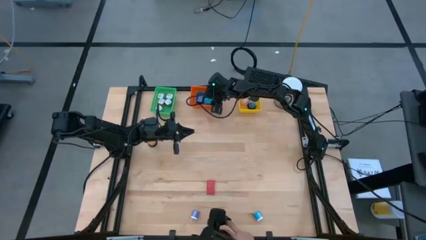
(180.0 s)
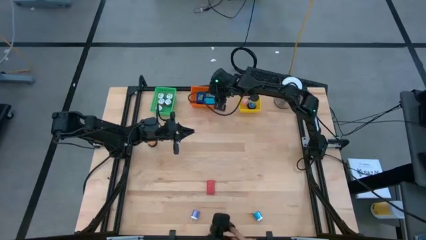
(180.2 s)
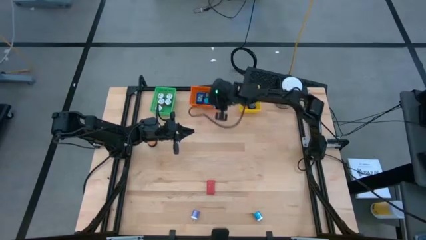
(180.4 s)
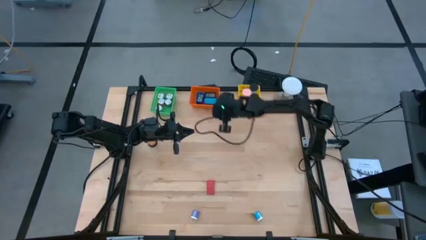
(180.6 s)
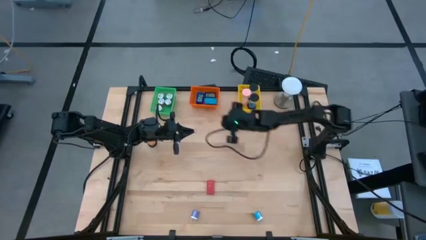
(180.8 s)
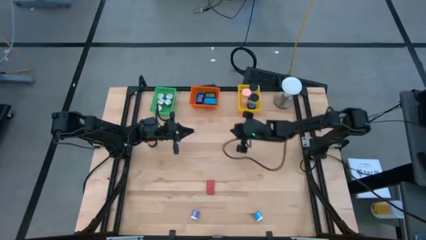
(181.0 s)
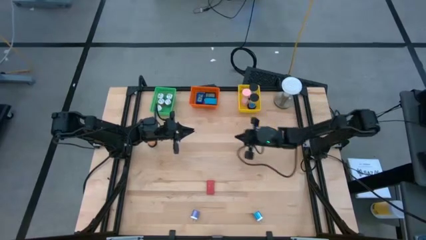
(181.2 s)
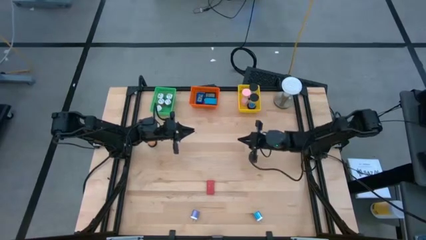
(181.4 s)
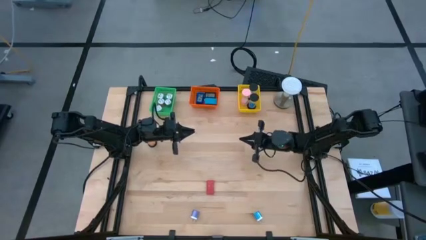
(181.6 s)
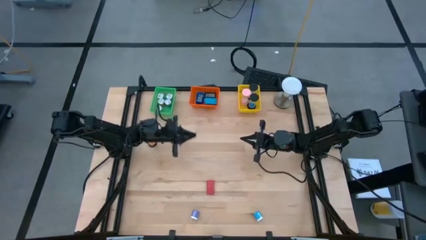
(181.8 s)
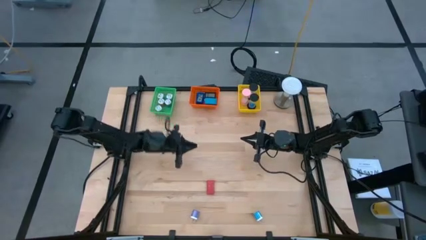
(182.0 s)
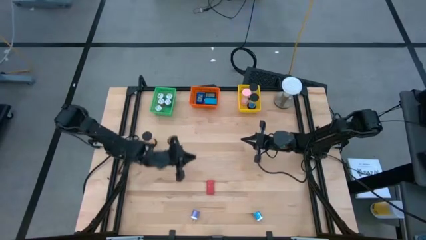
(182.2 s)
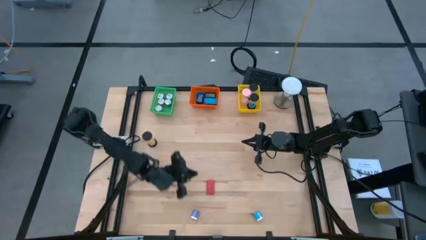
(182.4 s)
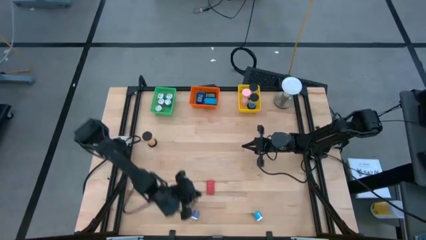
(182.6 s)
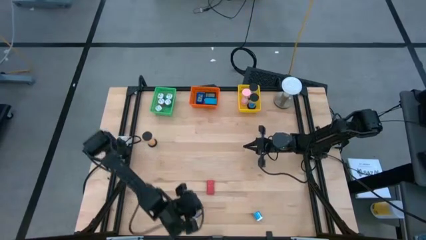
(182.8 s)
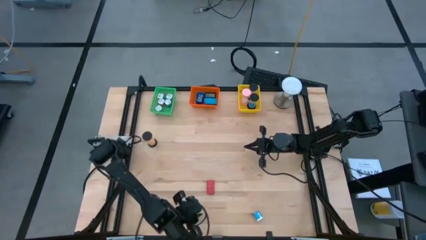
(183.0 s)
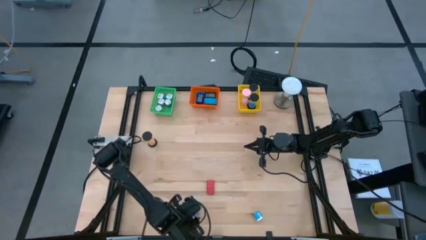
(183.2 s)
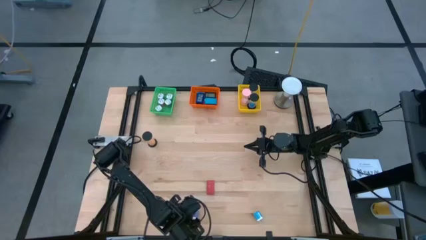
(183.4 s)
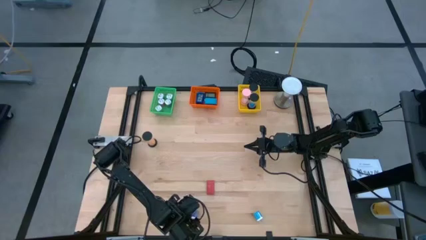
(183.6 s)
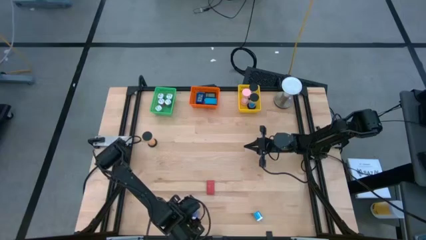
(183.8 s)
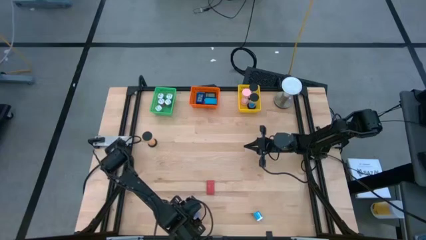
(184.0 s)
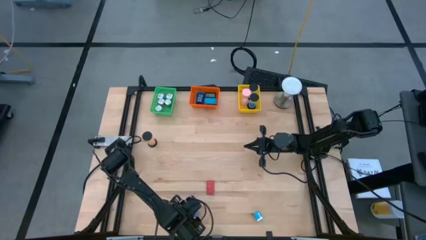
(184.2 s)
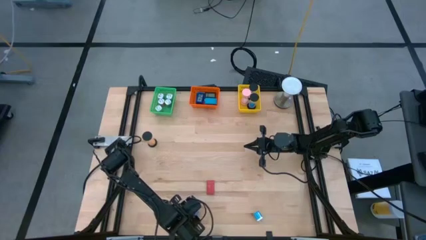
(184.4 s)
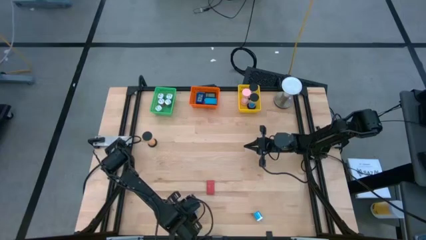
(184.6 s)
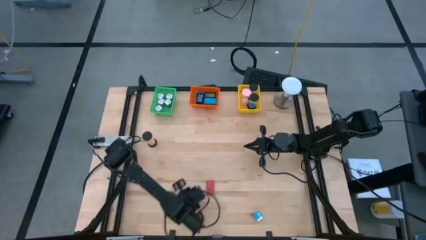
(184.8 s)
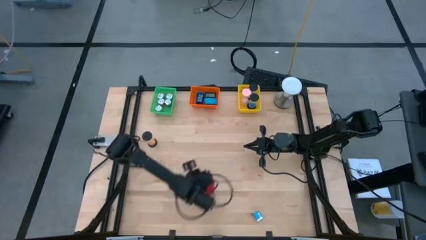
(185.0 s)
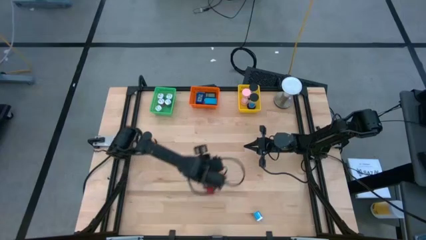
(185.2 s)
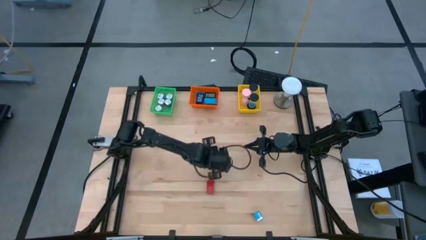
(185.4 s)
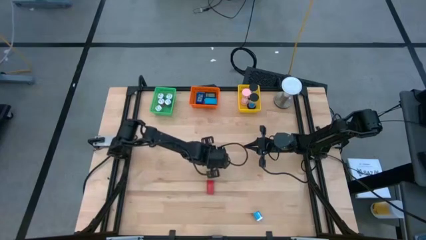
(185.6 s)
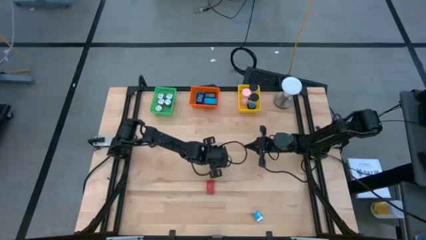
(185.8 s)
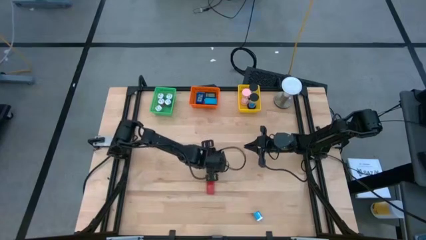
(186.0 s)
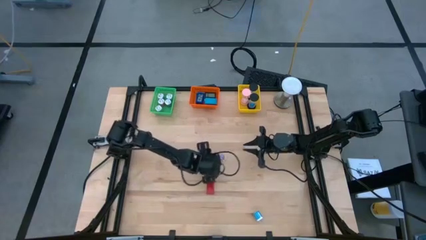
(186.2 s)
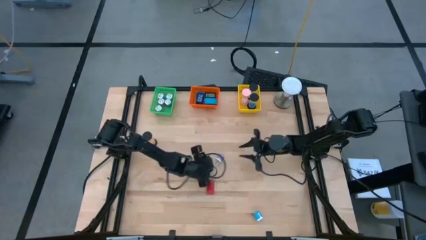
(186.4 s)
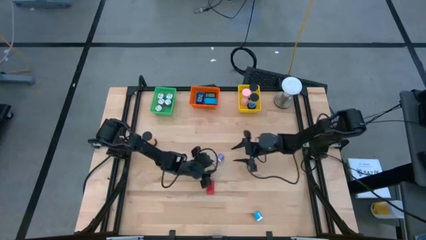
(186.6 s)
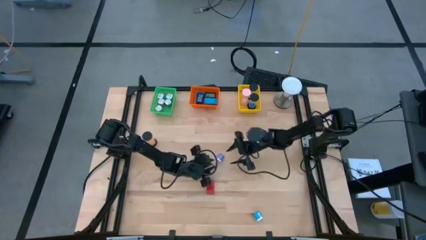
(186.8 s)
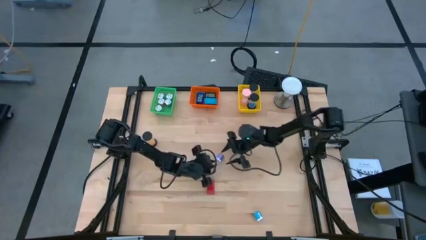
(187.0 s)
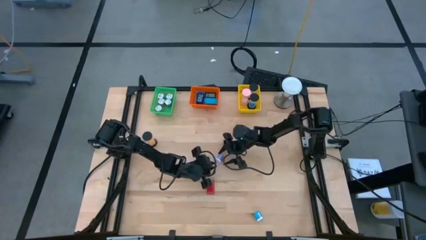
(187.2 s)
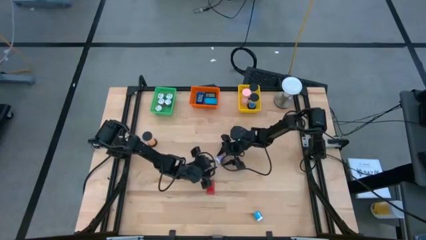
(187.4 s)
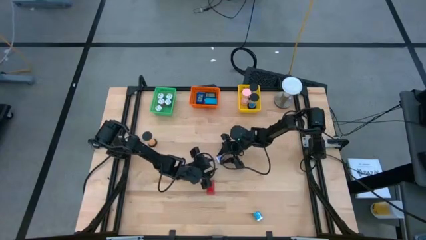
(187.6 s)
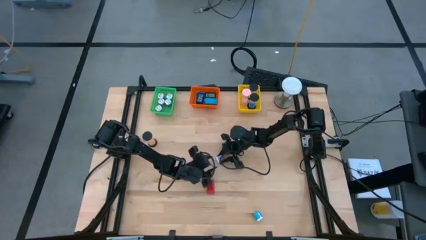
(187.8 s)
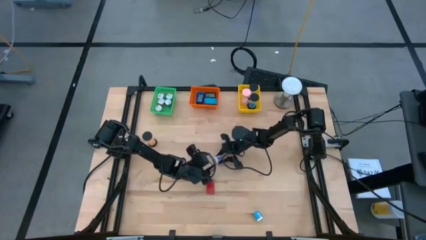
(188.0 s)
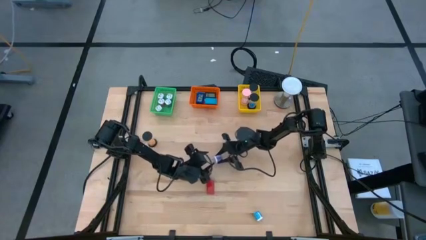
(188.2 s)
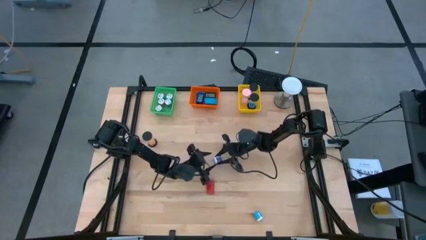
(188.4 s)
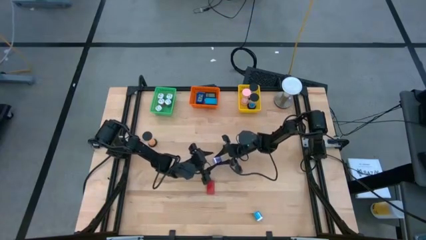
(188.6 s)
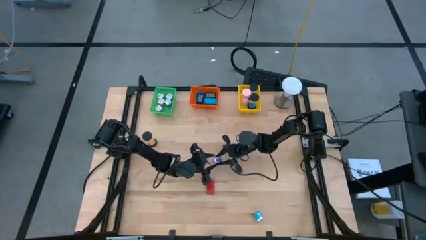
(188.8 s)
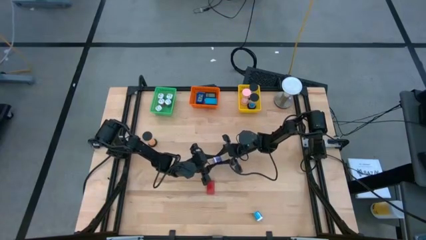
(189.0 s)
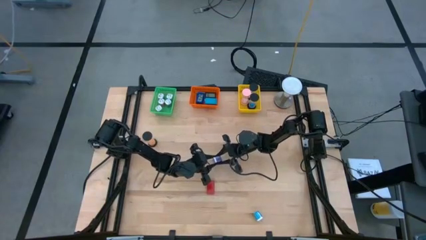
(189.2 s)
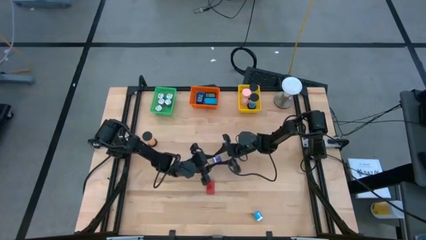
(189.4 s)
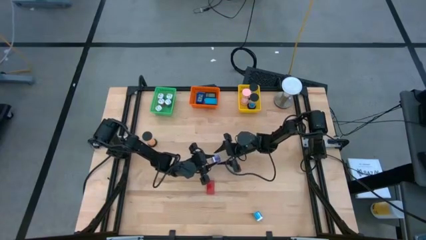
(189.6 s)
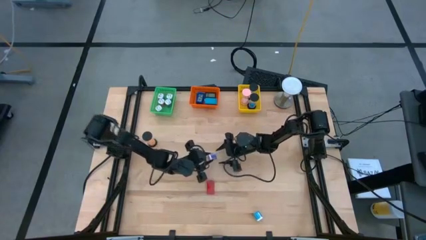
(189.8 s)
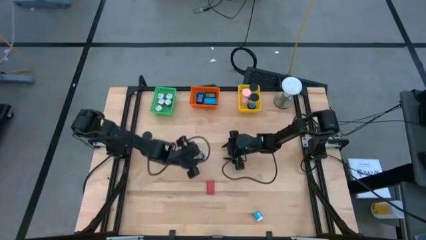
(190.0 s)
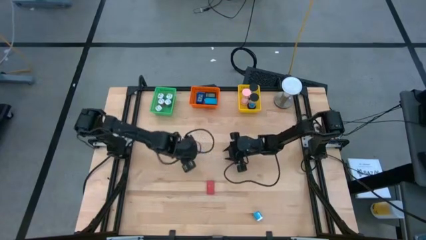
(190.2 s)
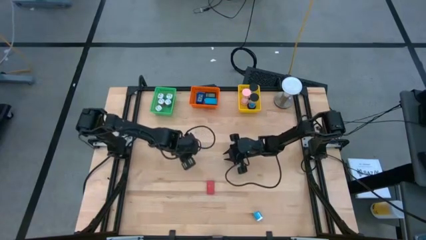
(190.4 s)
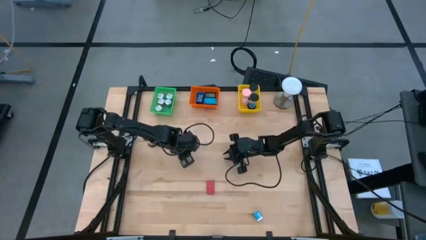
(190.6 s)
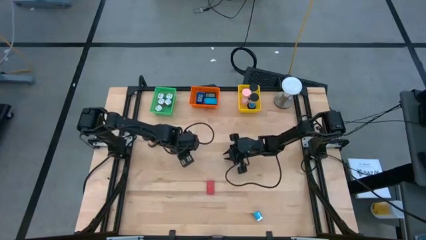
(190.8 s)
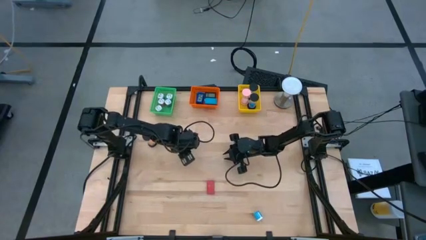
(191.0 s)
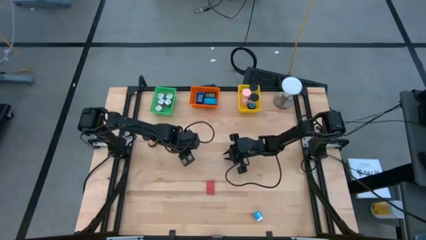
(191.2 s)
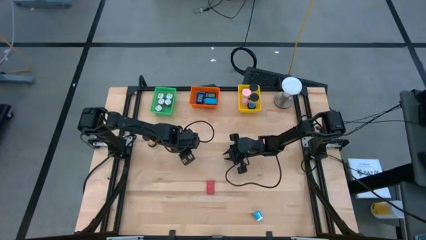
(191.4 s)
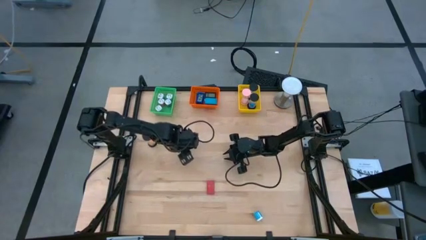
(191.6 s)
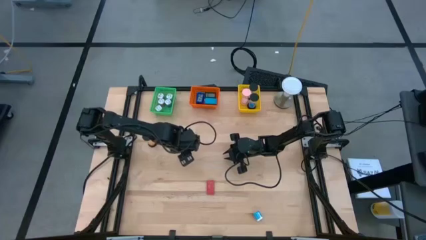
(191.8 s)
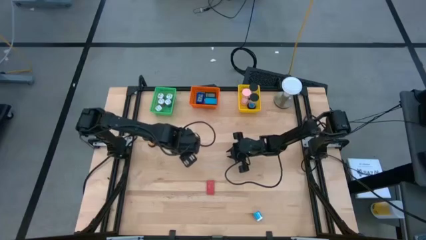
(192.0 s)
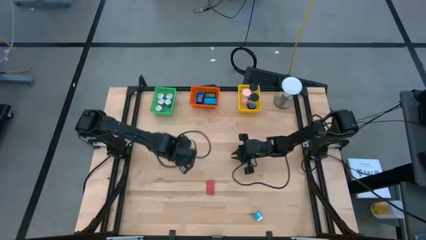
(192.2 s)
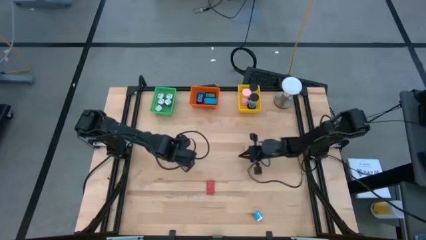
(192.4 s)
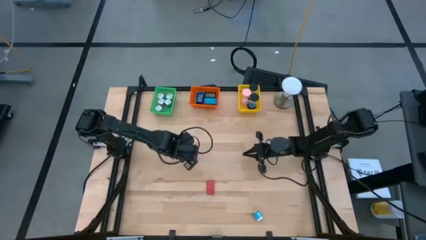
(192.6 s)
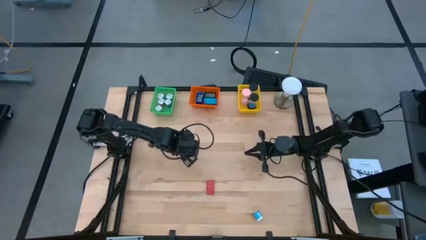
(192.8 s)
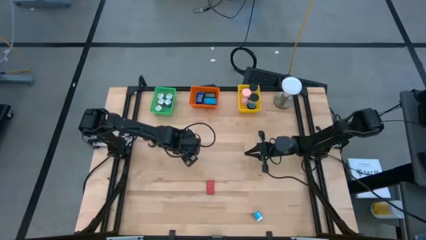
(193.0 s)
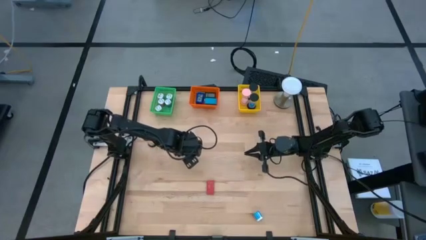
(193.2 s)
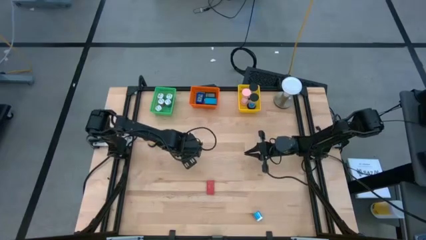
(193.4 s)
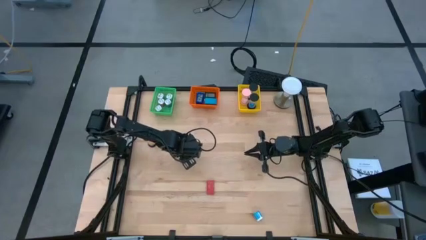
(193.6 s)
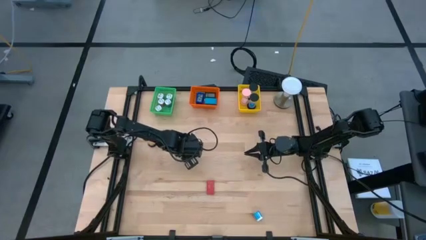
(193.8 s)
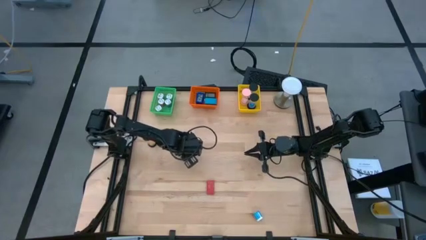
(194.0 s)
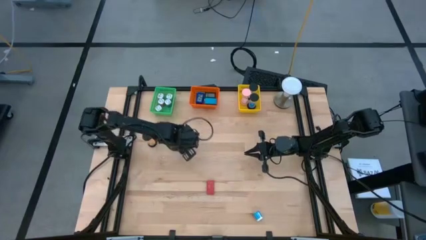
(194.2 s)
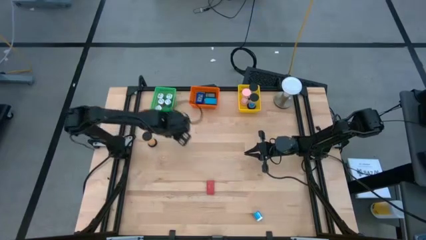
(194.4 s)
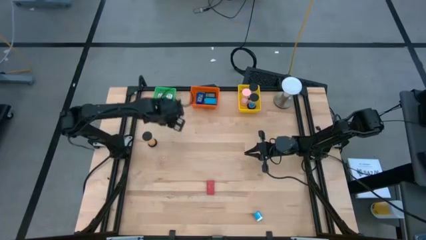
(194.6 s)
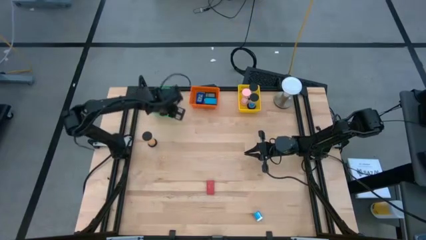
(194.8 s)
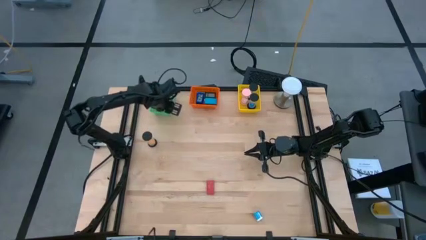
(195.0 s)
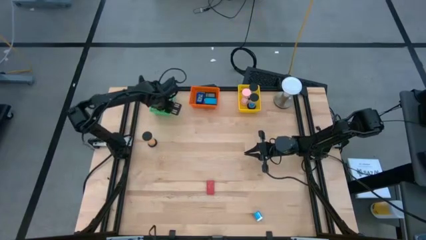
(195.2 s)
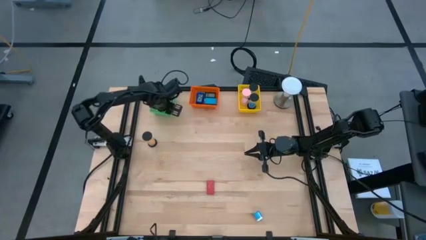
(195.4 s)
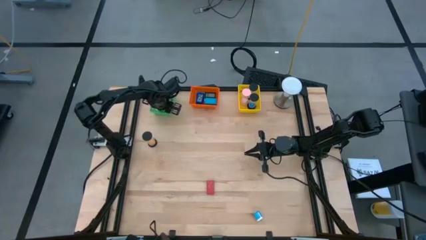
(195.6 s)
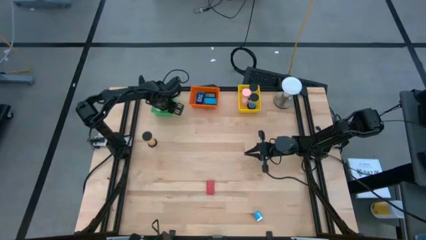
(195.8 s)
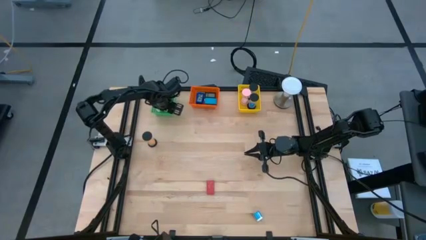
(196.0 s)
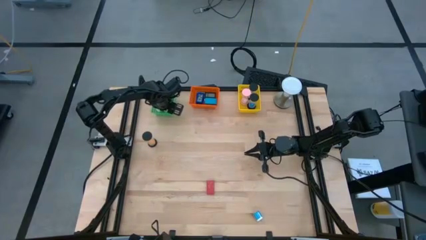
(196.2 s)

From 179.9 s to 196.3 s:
Task: Pick & Place Office items
Put the purple charger adaptor into the green bin
